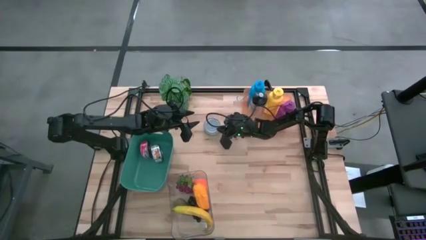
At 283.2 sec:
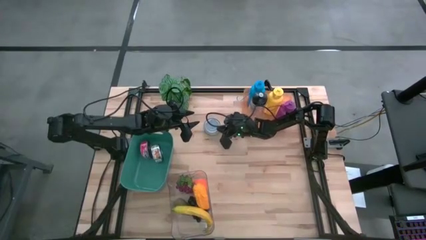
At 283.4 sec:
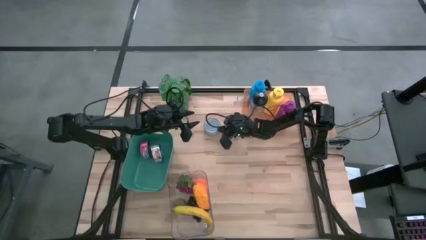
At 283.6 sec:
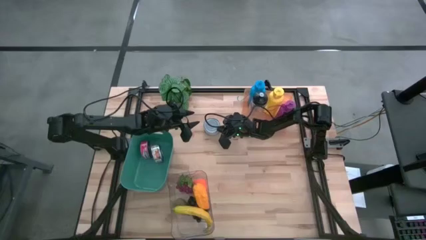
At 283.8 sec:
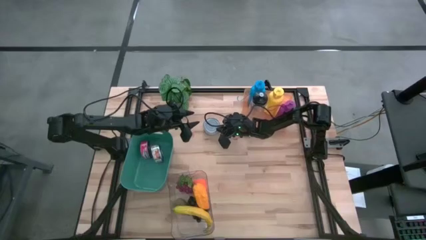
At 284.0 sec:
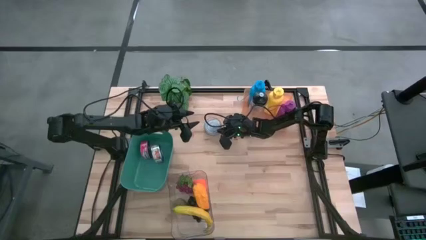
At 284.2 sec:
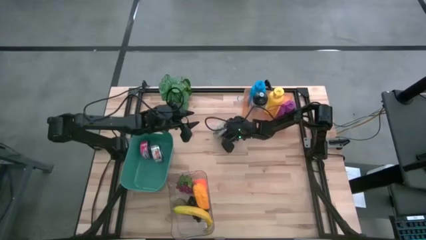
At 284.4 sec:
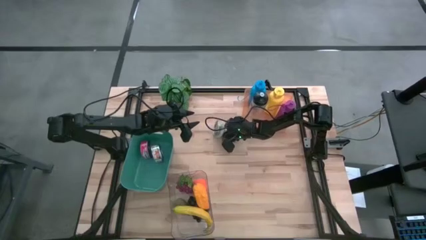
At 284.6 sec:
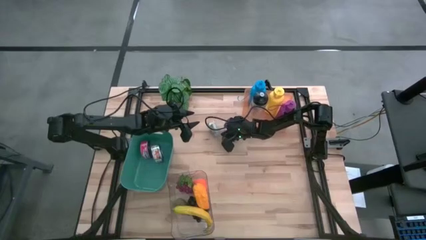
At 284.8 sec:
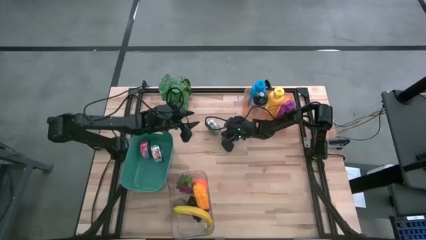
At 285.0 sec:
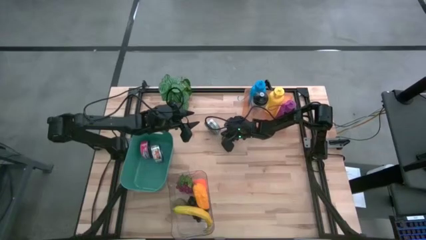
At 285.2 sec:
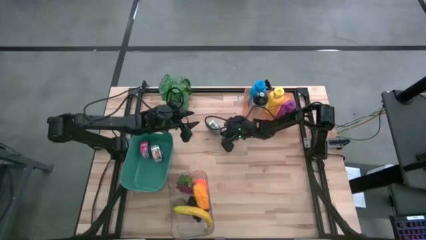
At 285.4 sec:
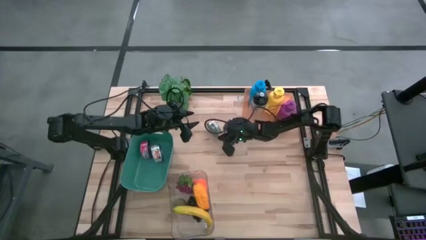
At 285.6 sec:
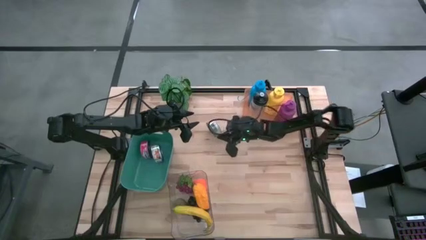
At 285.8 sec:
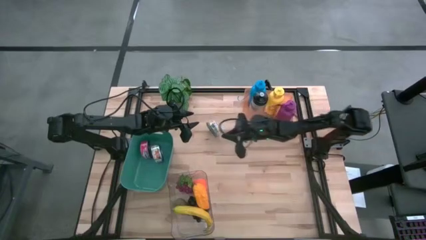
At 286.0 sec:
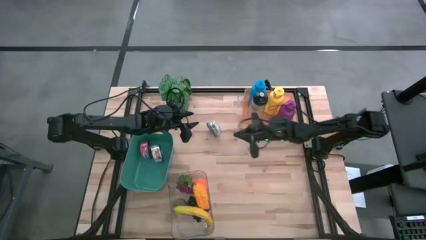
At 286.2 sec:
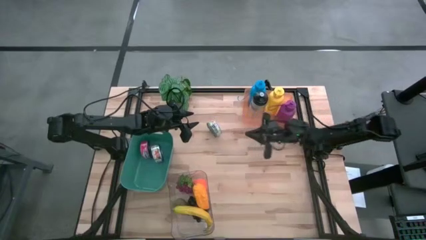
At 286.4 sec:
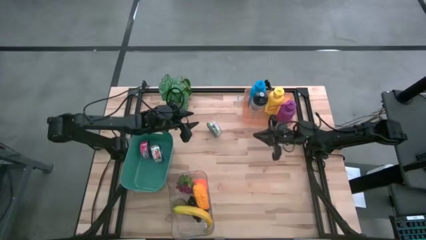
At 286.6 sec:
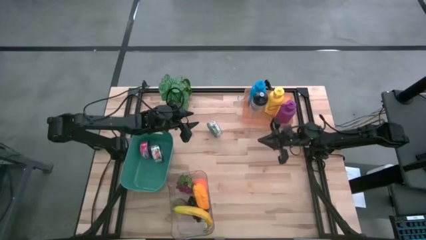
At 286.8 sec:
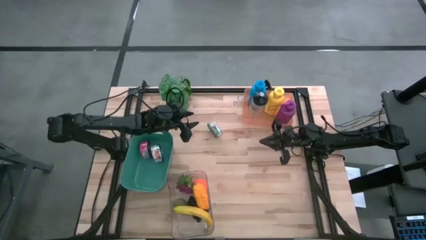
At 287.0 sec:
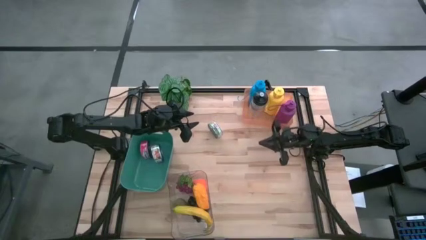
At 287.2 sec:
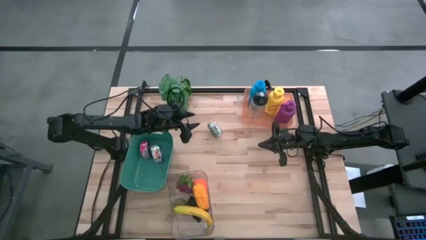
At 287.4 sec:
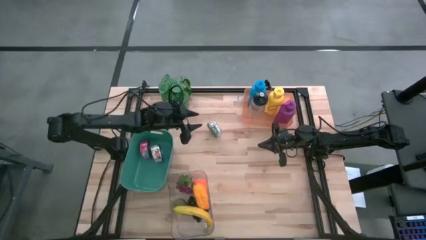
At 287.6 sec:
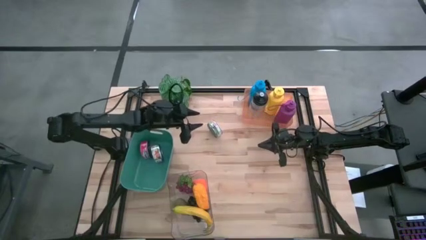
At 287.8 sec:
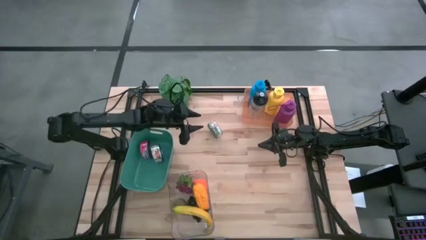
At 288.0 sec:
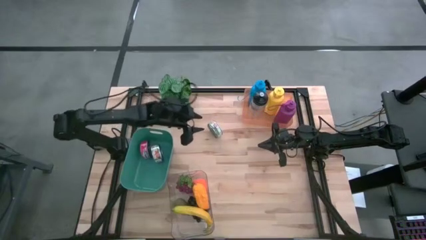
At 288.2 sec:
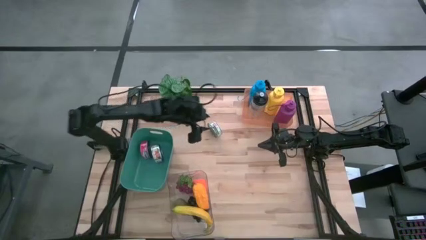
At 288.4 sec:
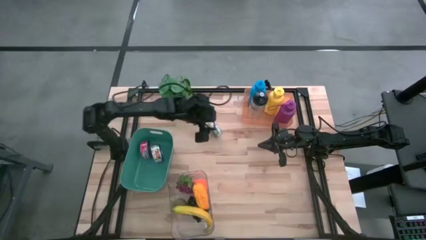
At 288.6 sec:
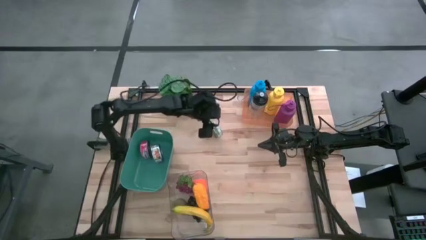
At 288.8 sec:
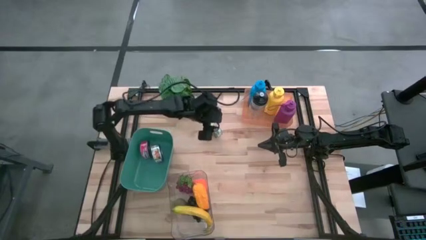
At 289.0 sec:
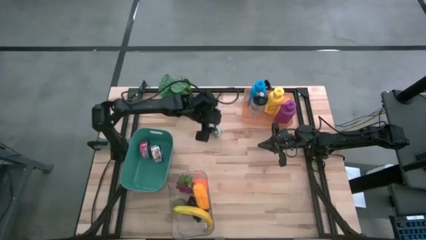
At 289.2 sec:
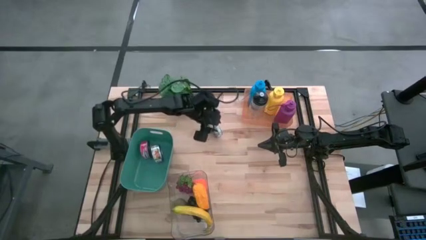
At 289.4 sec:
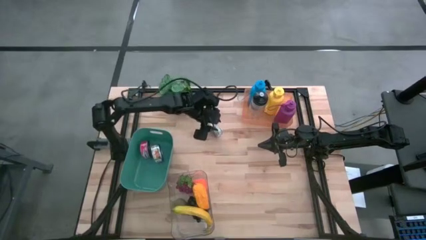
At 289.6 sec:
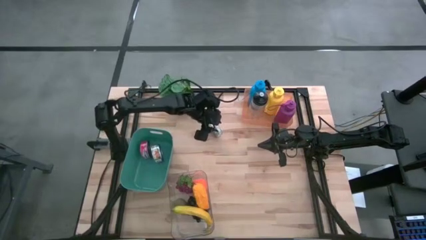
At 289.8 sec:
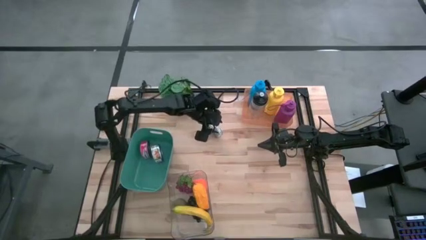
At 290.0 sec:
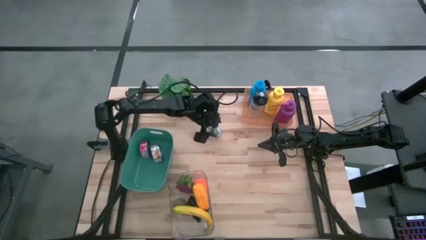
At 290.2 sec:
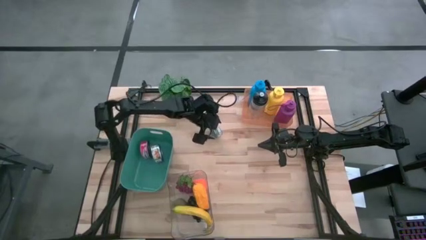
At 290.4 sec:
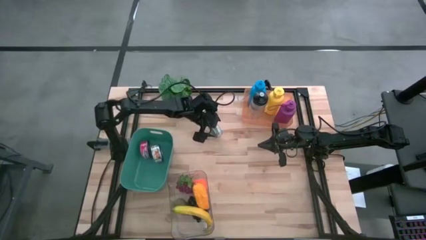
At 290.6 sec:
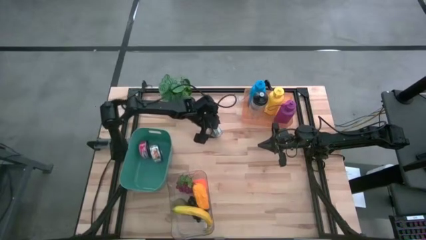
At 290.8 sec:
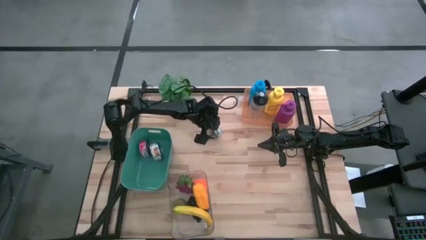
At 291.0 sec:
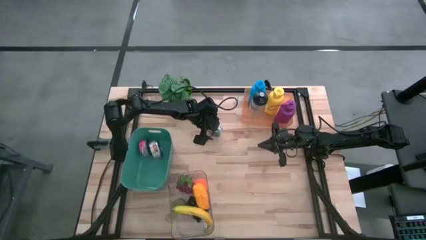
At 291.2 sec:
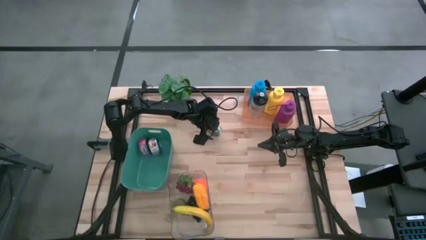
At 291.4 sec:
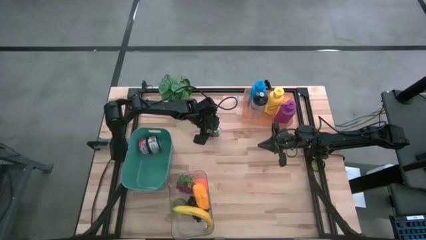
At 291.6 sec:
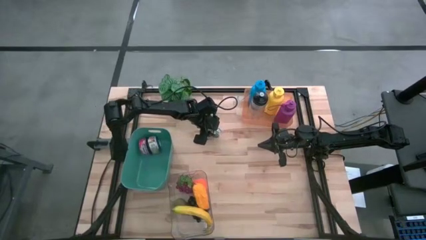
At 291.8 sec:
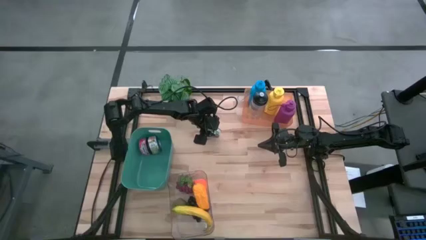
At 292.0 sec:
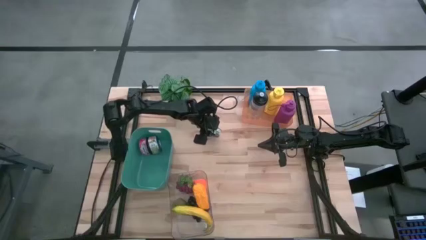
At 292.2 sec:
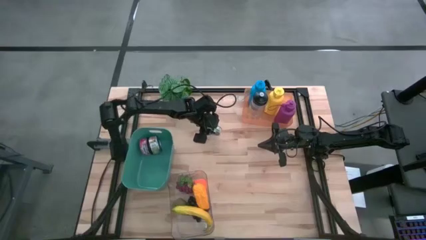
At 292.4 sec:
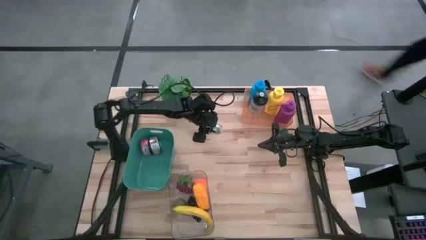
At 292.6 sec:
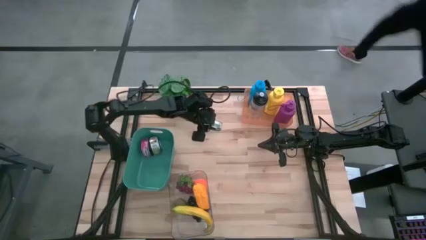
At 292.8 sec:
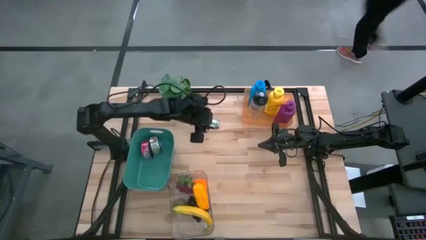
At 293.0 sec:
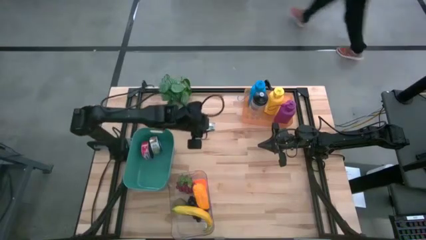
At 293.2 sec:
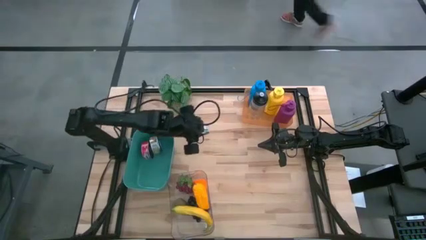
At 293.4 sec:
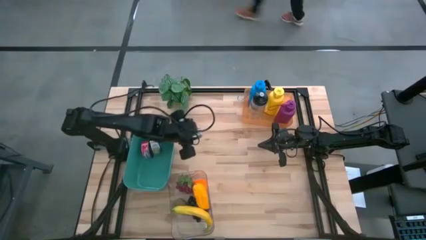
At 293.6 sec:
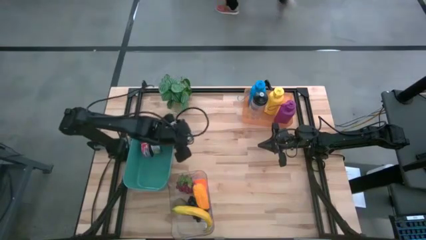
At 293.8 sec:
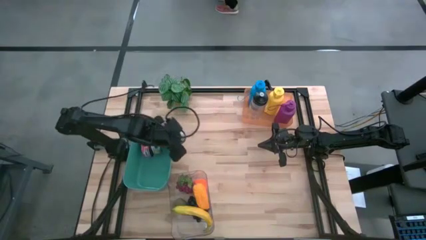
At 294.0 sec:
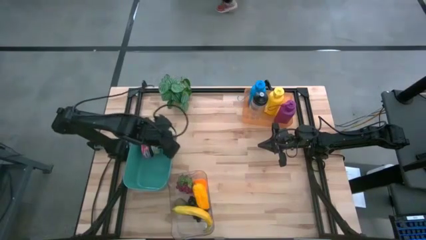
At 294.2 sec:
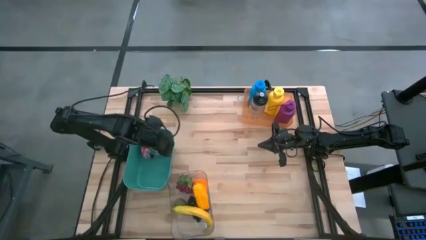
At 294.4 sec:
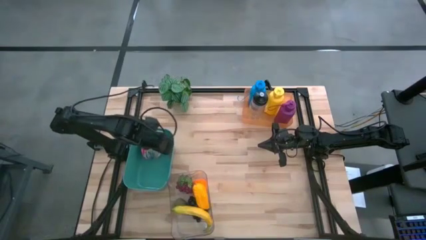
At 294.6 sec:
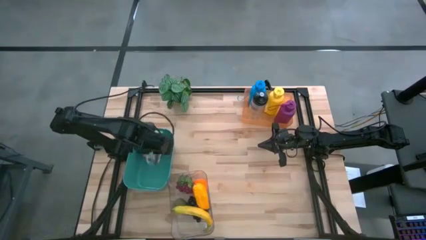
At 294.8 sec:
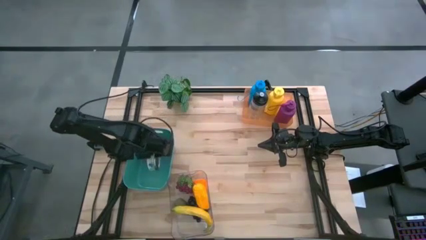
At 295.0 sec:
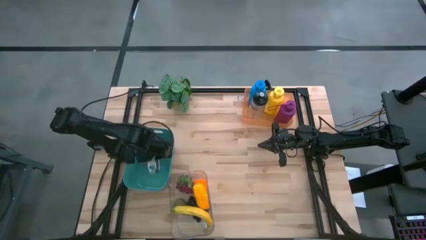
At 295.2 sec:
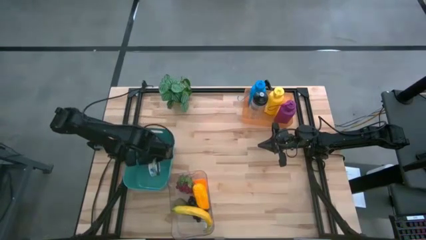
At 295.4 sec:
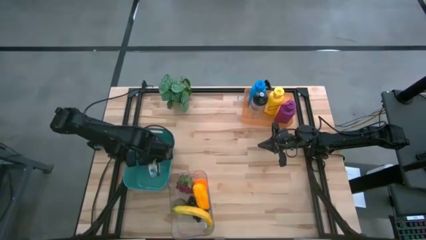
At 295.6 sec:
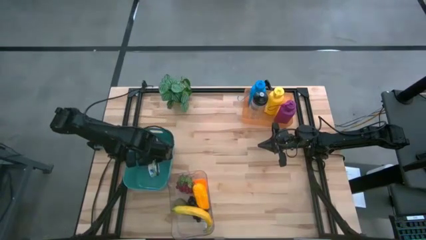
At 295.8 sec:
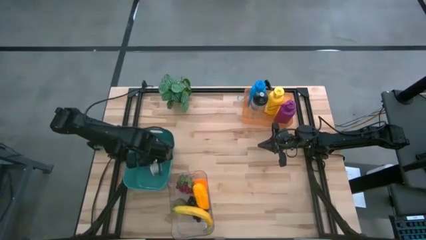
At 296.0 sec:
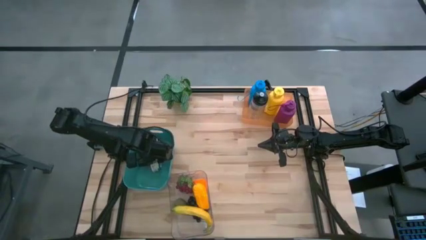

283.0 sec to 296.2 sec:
Task: Pick & Place Food Item
Put the green tuna can into the blue bin

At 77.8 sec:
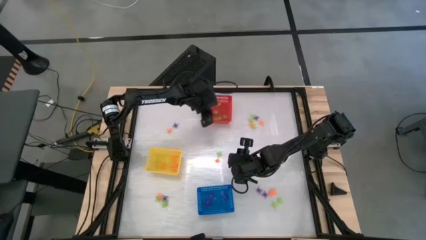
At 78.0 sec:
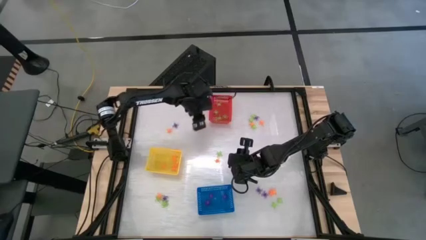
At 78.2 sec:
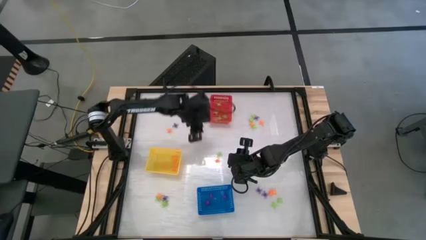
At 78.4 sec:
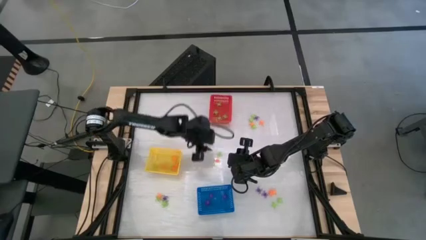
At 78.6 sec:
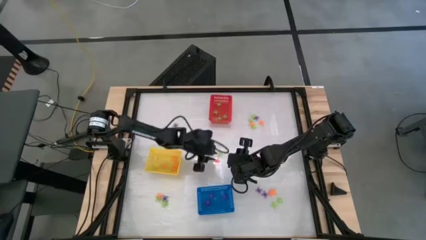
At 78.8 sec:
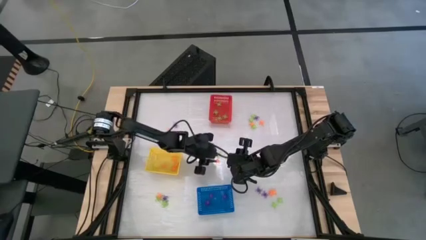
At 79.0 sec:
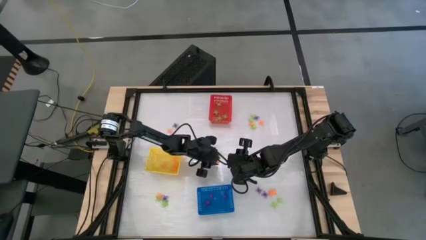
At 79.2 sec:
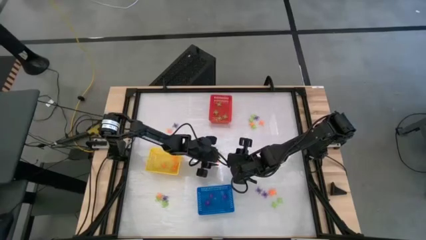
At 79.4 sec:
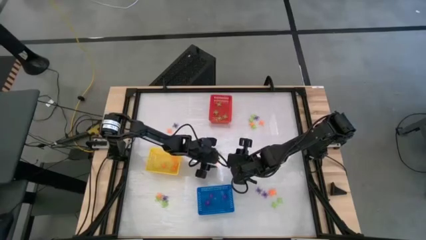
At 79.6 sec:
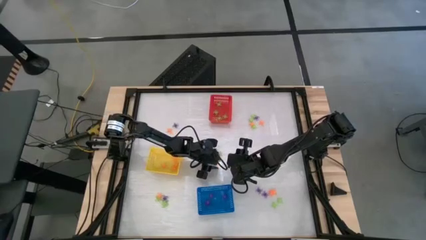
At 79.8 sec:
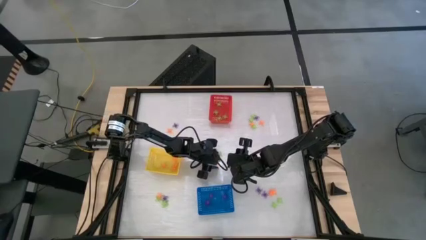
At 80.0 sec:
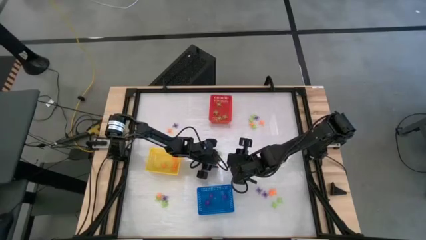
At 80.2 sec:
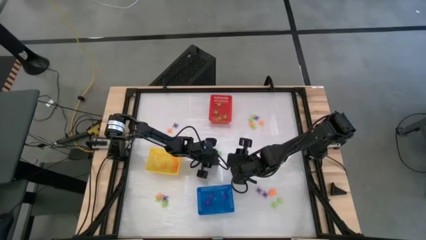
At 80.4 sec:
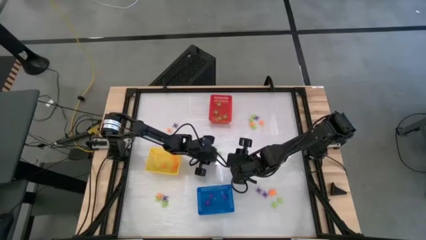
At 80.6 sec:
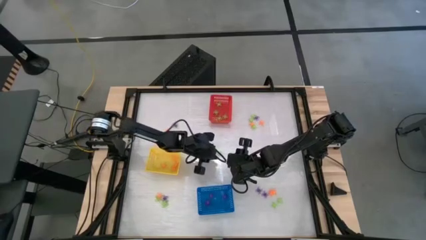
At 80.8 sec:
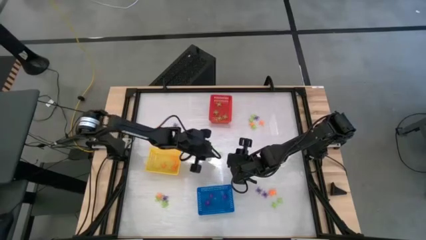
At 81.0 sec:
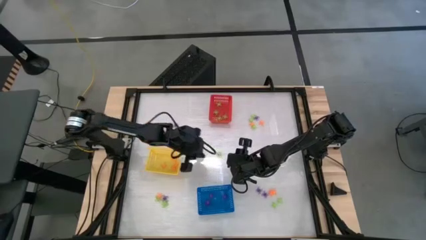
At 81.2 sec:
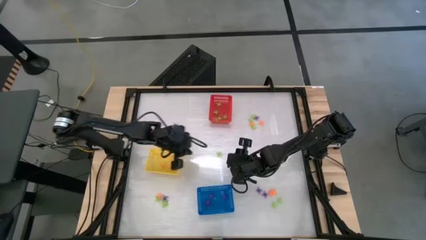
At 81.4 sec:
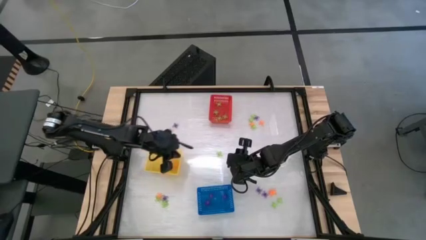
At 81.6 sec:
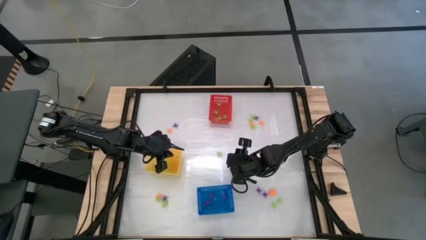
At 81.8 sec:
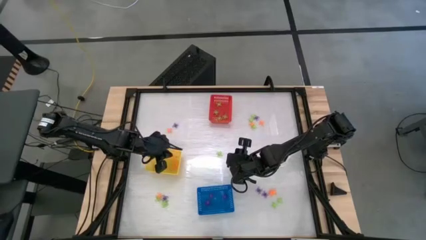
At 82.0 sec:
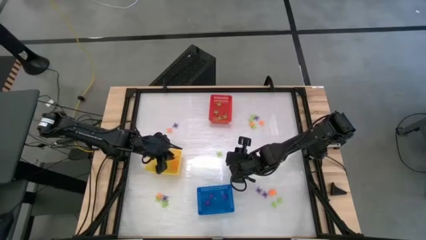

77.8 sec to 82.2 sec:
Task: Sort Halloween decoration
Put the orange spider toy into the yellow basket
